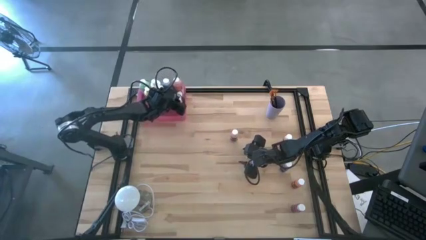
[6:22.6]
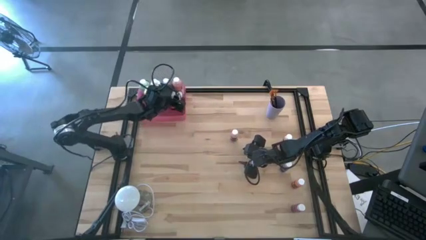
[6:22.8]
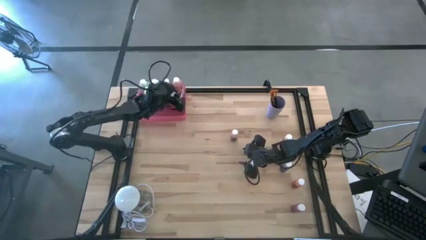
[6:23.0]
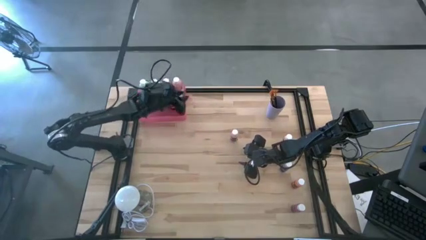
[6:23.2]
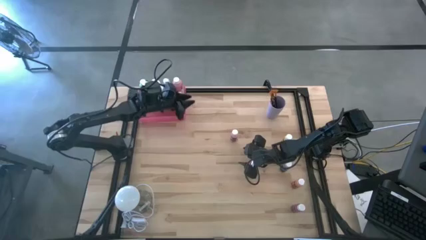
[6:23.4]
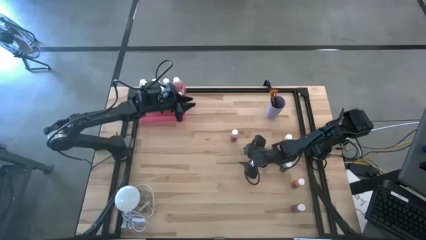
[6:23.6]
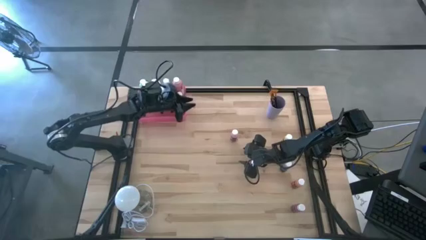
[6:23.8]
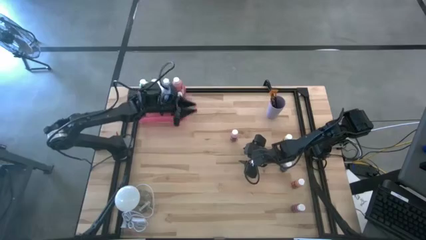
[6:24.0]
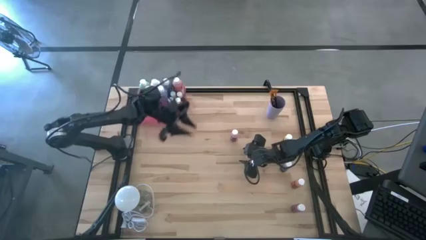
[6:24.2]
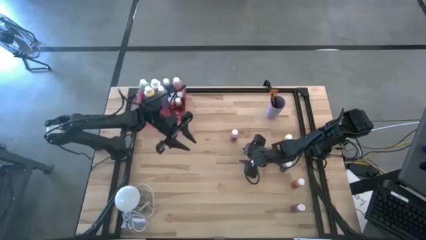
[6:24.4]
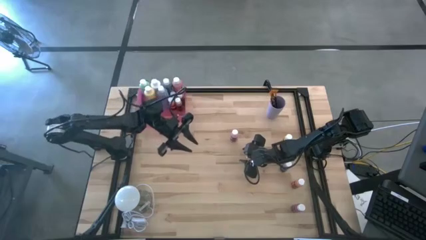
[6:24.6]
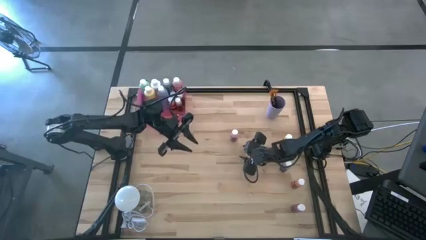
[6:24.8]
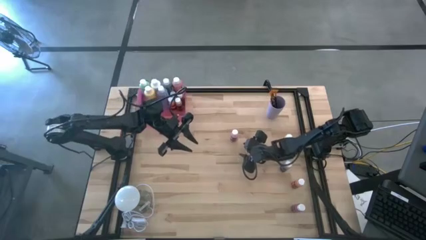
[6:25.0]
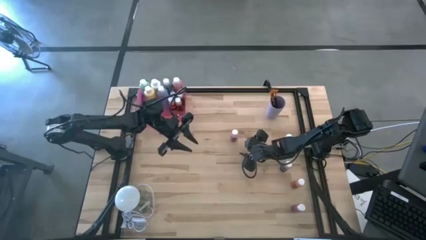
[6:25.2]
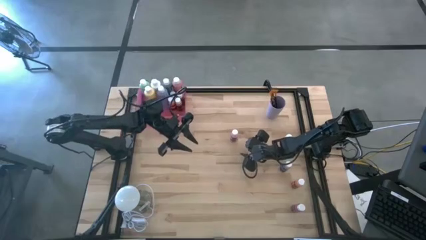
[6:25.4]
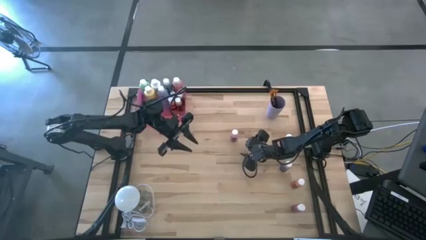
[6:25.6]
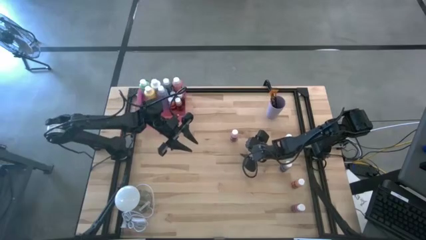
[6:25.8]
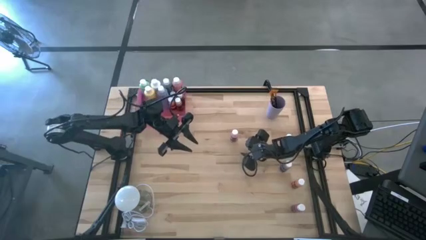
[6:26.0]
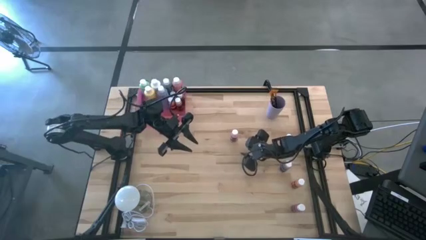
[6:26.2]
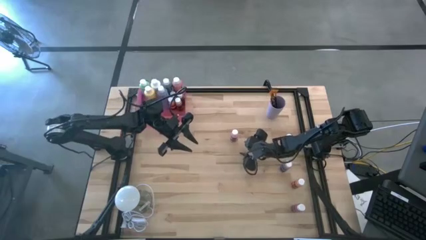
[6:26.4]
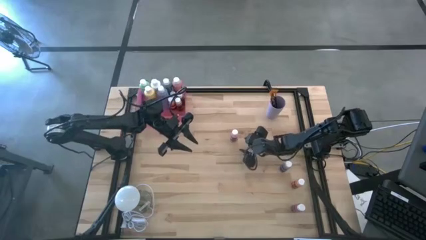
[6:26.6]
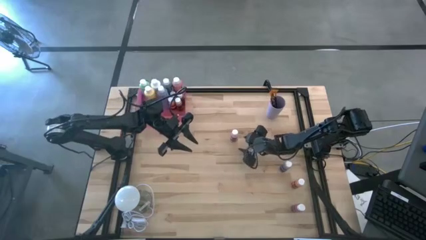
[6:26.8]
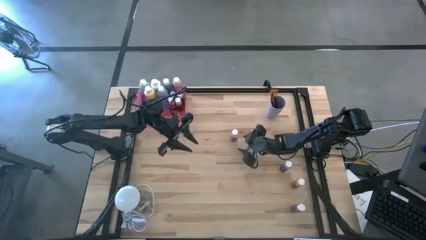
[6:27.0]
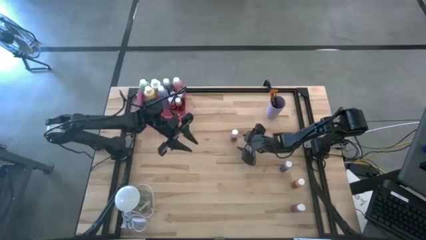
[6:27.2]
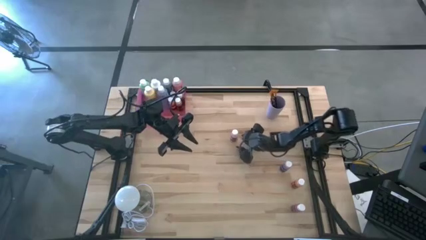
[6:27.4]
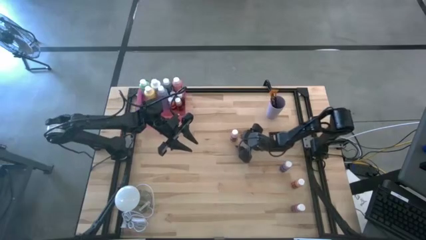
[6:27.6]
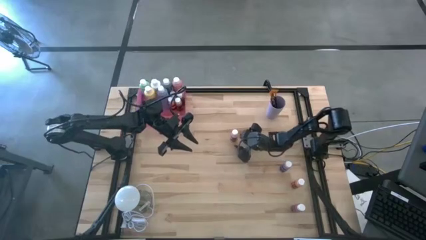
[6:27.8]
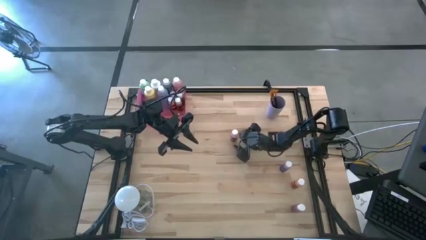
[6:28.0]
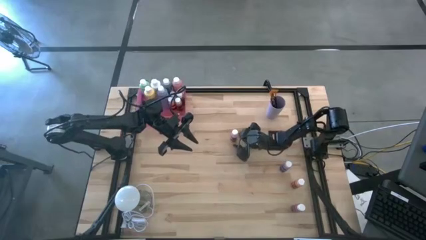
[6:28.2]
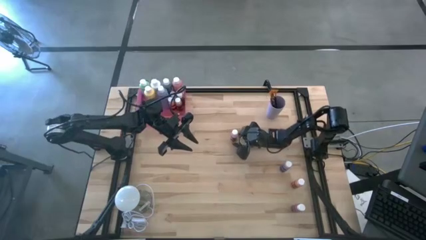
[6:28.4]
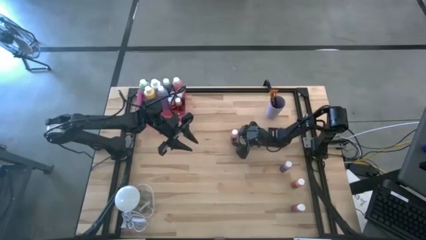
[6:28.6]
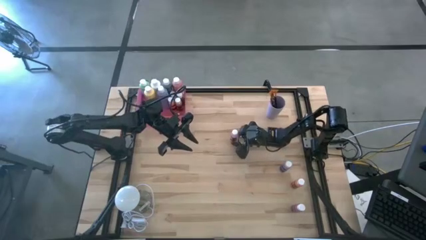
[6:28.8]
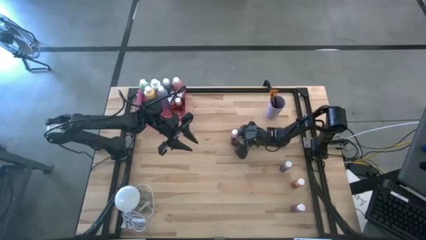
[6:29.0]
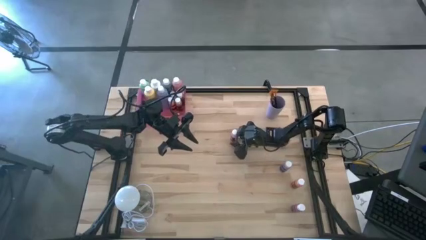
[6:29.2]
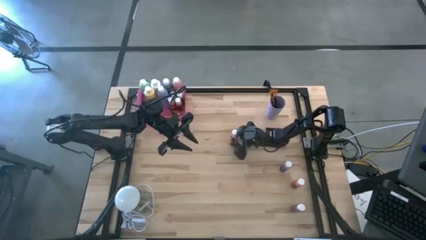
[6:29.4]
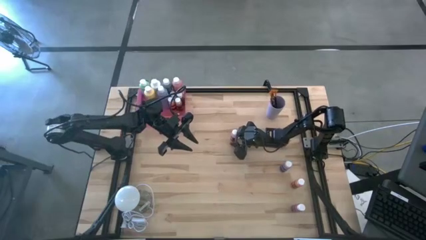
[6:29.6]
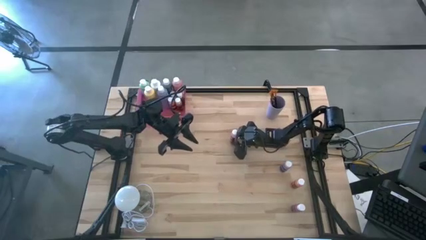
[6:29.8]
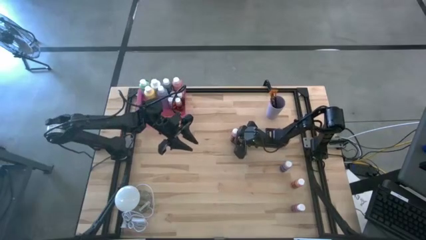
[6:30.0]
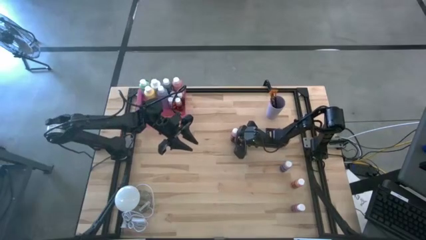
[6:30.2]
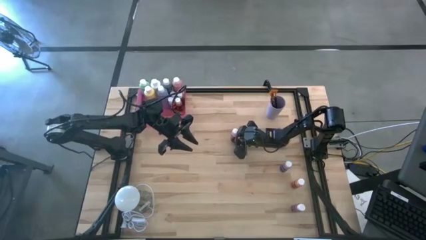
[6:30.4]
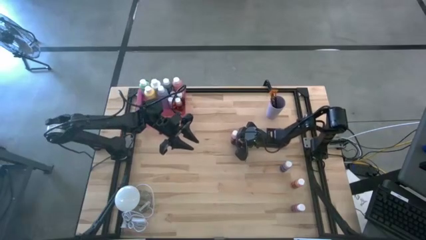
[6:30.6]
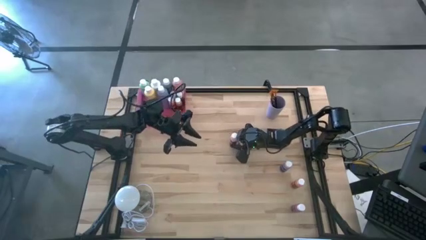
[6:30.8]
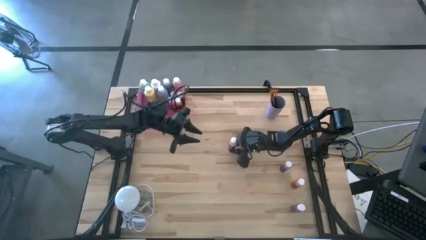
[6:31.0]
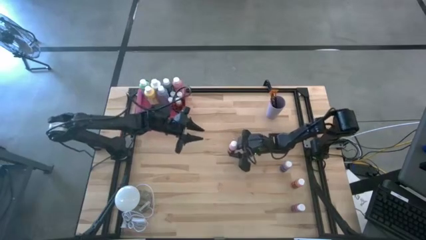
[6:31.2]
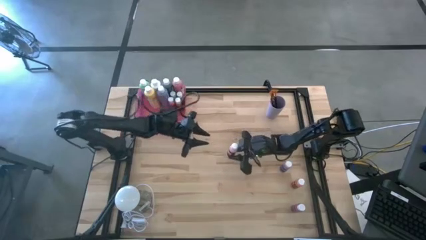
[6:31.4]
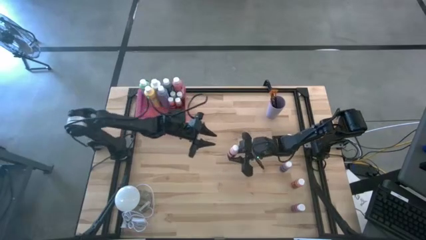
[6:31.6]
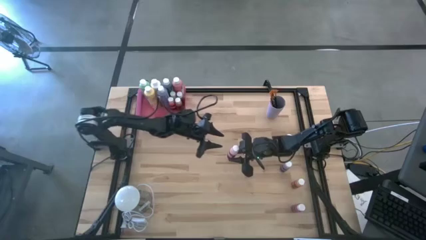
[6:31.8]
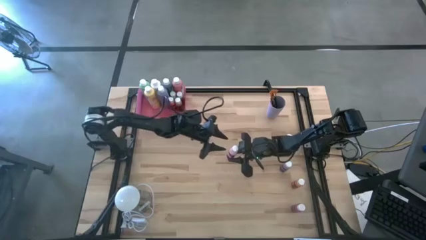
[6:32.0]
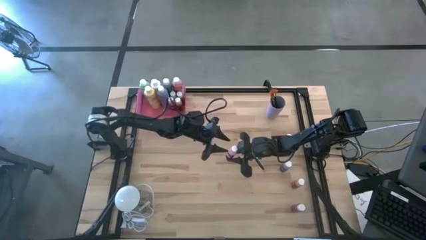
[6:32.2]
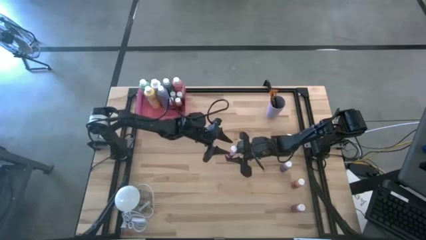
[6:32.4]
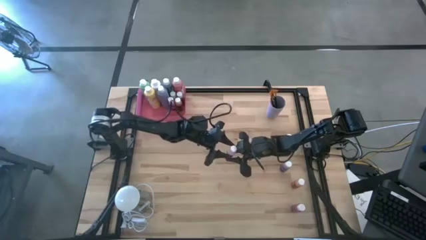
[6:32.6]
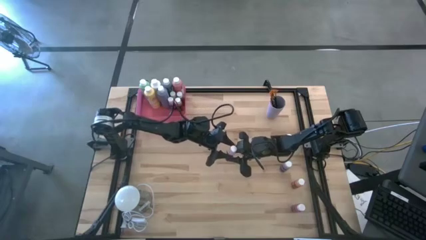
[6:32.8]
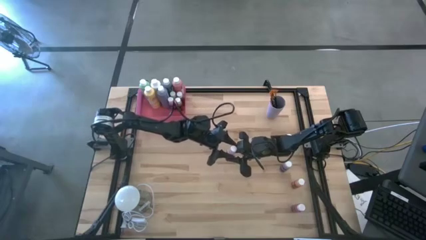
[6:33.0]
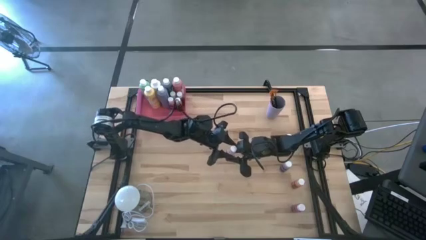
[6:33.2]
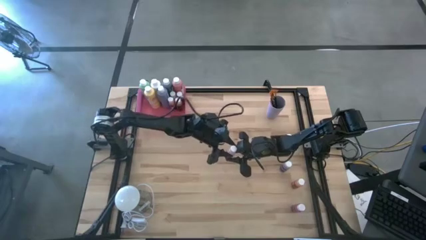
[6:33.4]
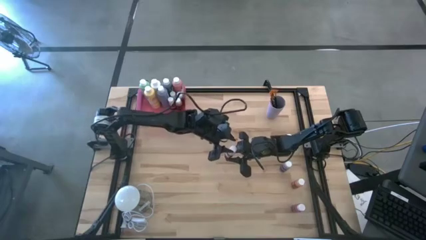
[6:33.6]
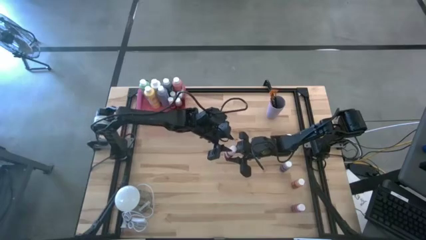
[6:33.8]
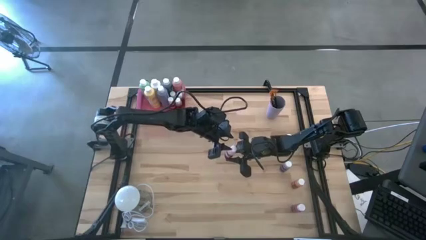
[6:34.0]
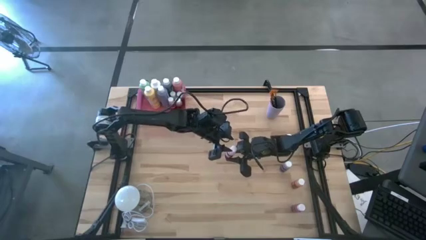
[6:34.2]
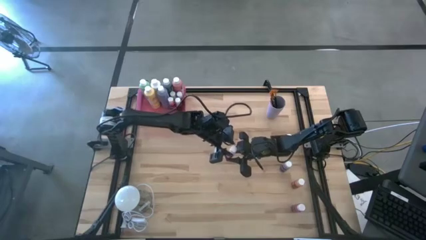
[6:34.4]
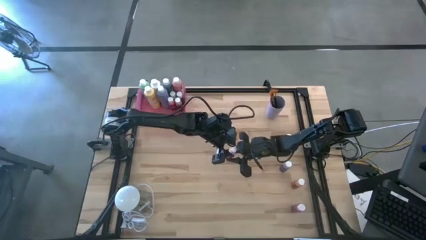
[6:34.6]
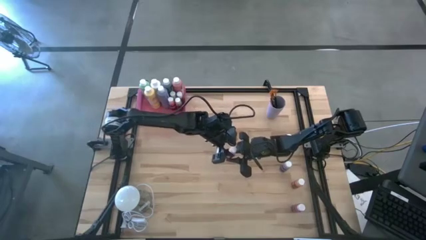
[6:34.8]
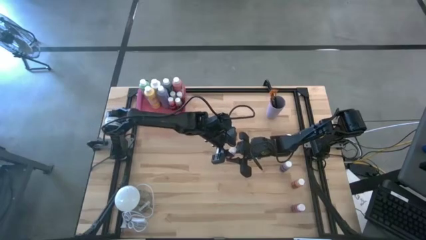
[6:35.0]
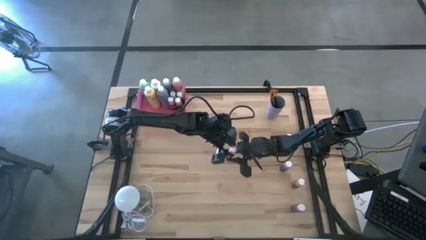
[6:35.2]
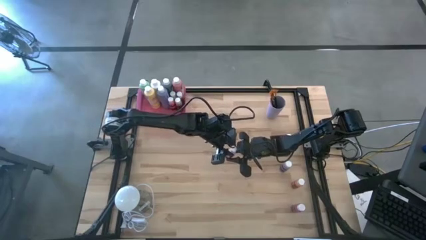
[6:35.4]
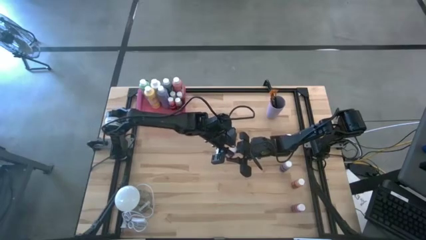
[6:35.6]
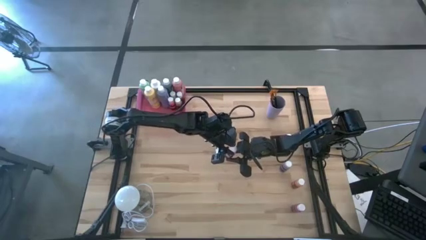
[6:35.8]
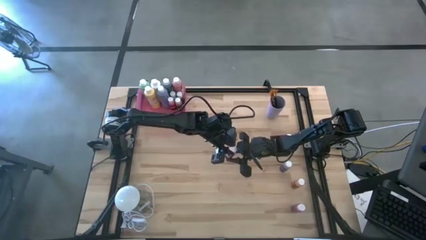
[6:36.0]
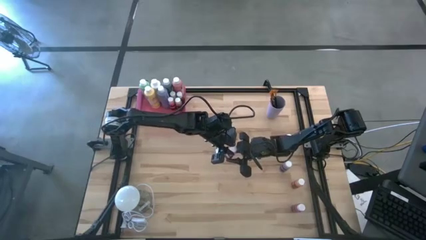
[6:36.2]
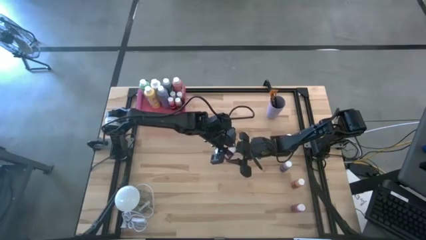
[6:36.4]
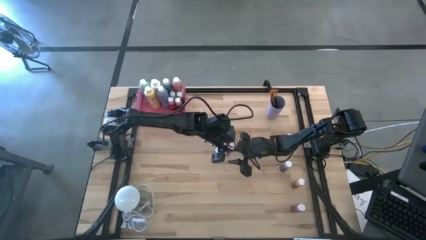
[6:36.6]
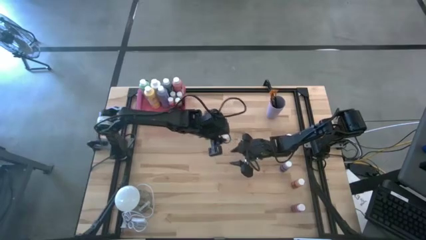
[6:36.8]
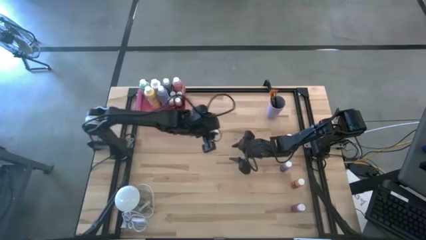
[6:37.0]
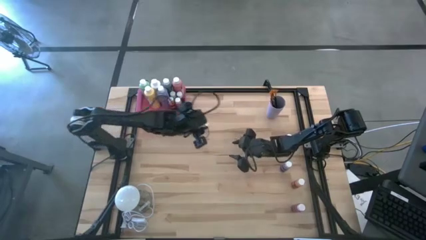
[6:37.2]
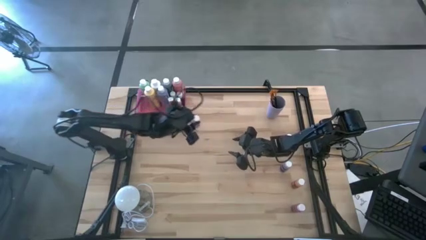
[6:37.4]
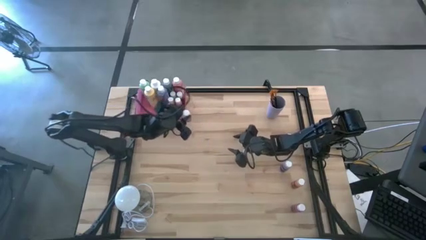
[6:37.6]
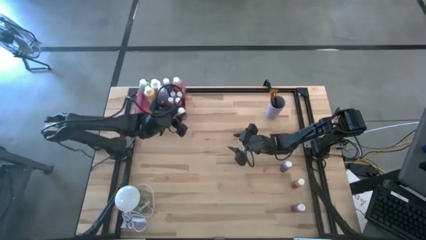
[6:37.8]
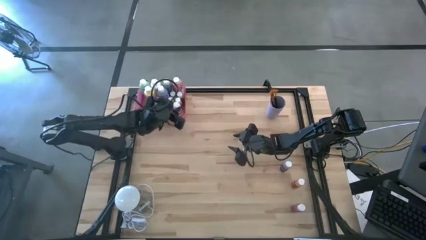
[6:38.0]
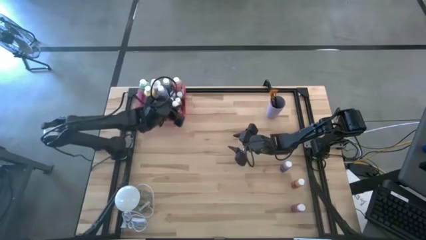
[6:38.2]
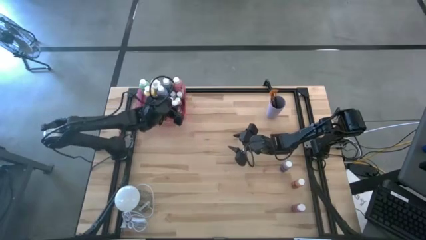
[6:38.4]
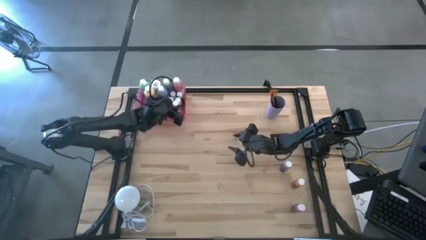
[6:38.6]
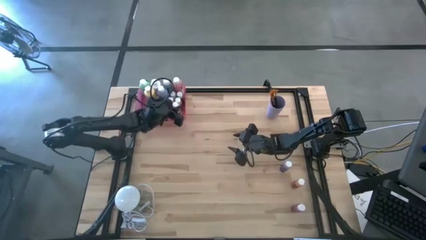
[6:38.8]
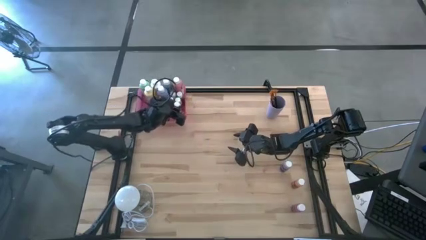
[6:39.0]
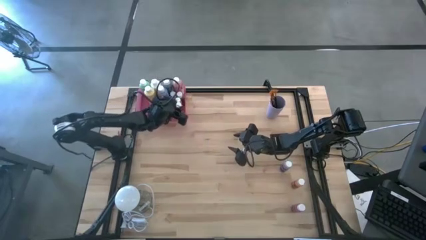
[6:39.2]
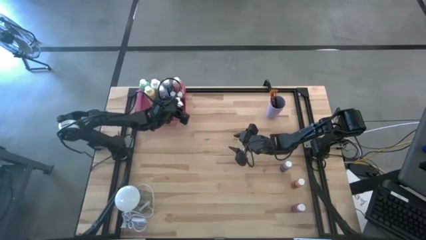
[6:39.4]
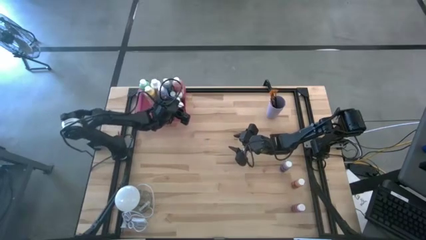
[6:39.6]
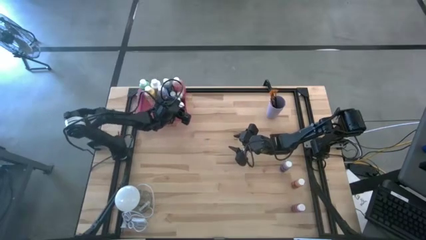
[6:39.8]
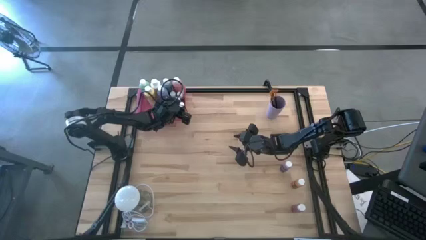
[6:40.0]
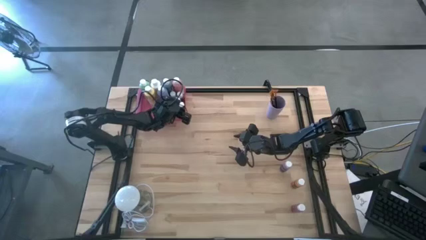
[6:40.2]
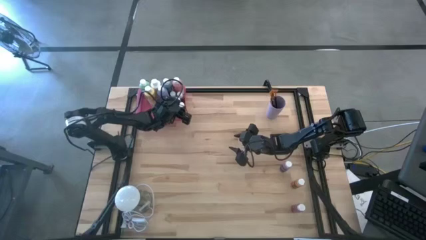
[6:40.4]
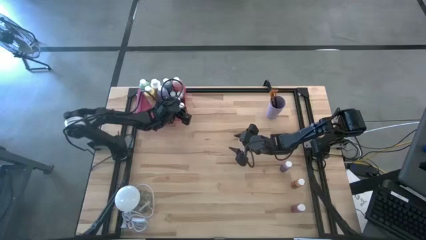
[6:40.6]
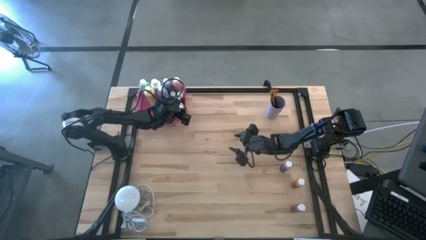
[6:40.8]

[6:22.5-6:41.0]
Task: Pick & Place Paint Supplies
Put the small pink paint bottle into the pink bin
